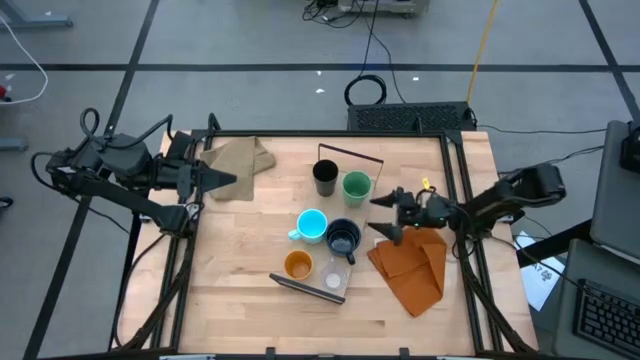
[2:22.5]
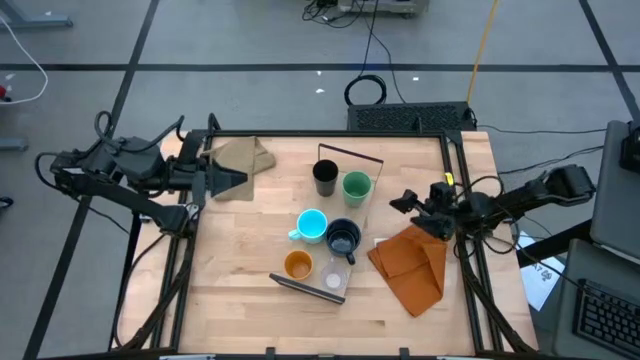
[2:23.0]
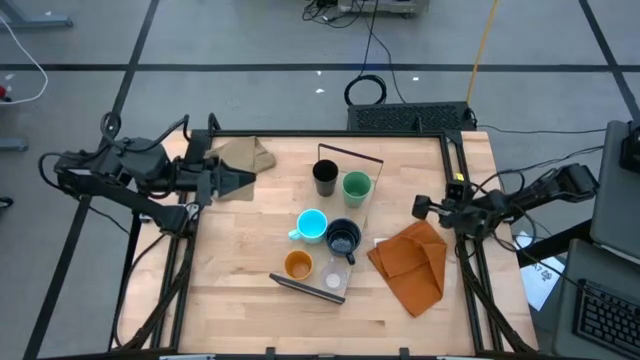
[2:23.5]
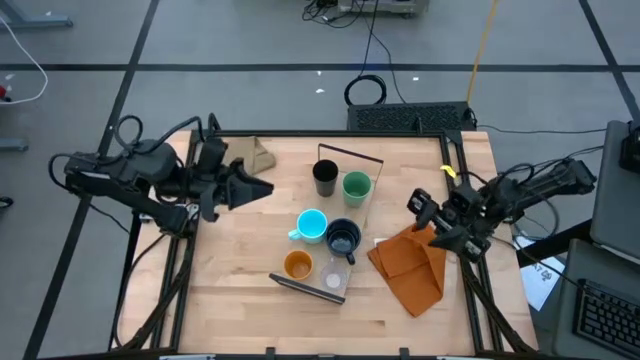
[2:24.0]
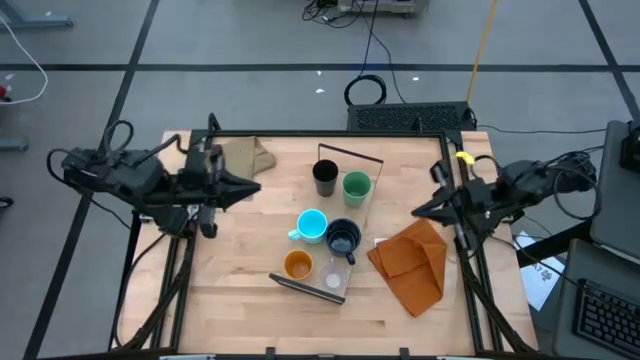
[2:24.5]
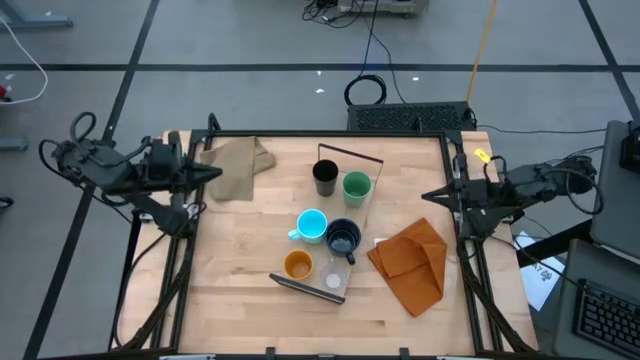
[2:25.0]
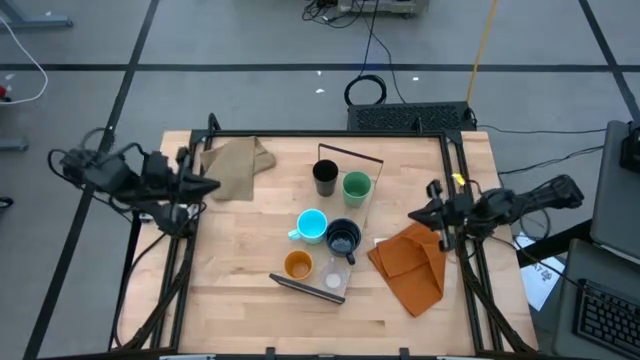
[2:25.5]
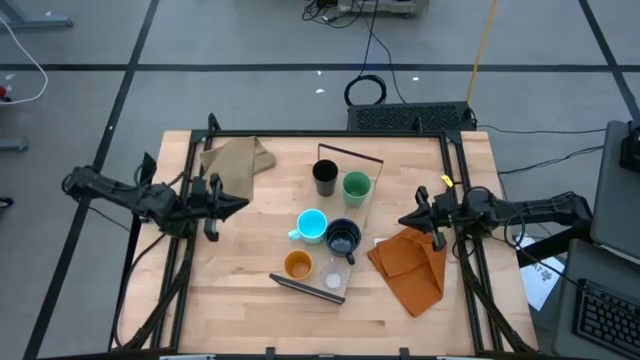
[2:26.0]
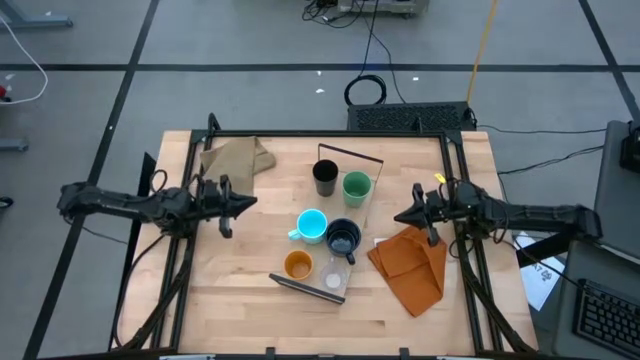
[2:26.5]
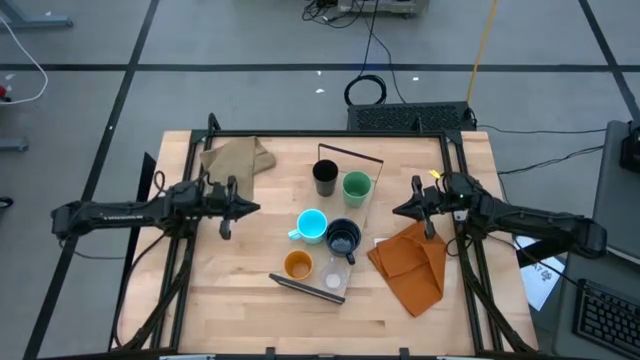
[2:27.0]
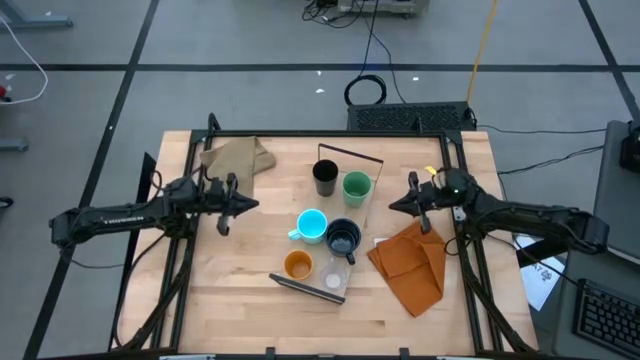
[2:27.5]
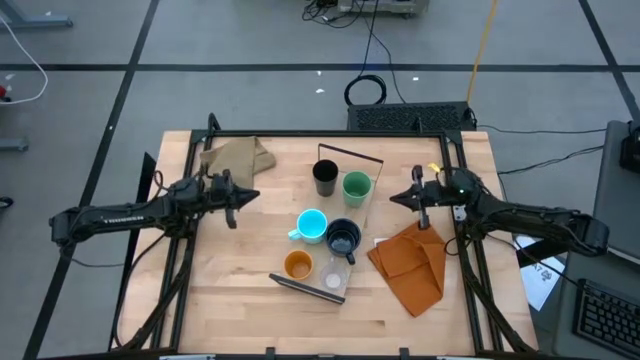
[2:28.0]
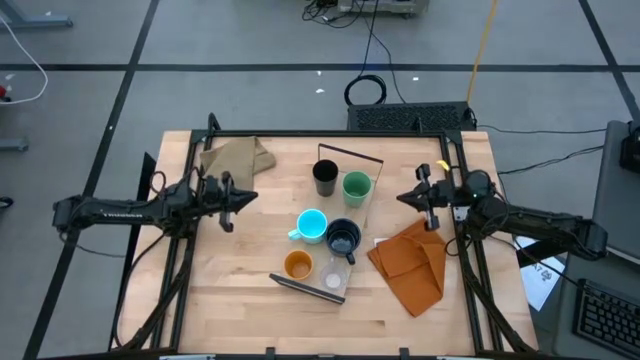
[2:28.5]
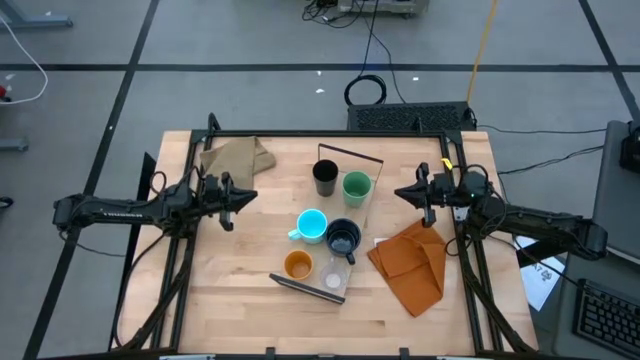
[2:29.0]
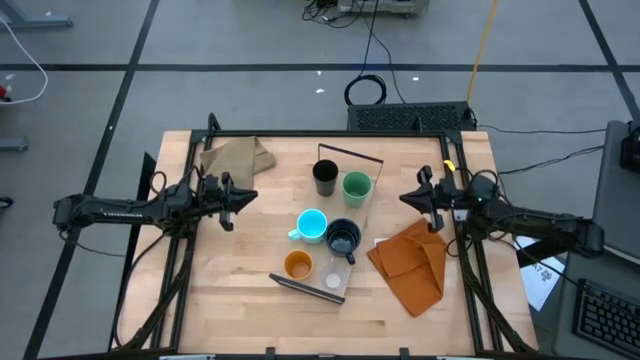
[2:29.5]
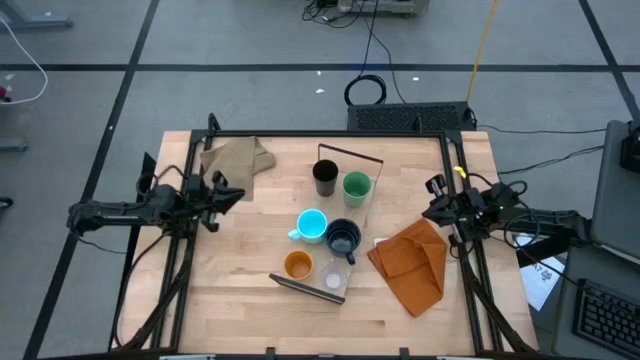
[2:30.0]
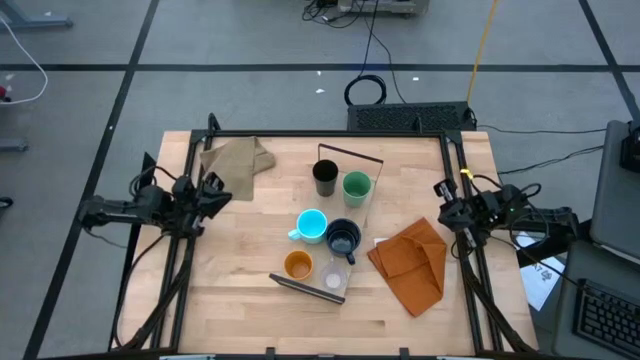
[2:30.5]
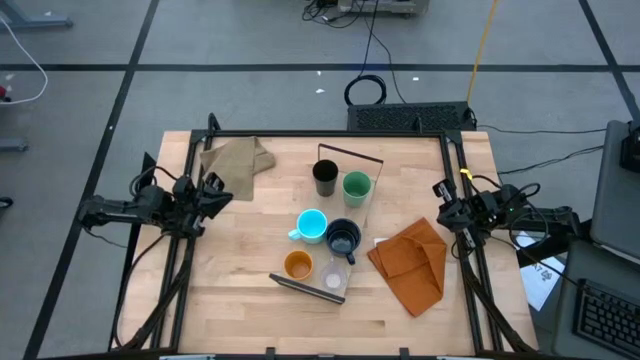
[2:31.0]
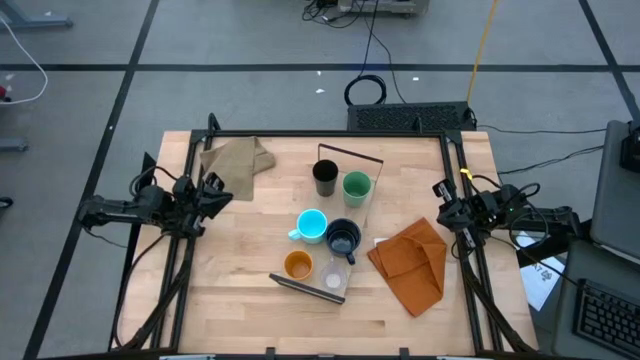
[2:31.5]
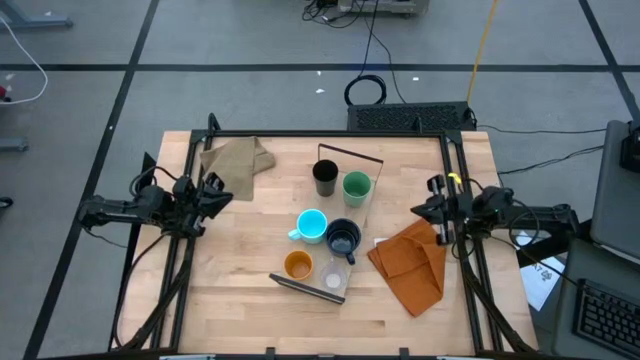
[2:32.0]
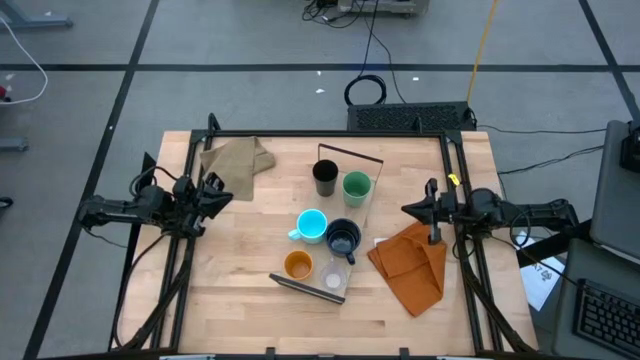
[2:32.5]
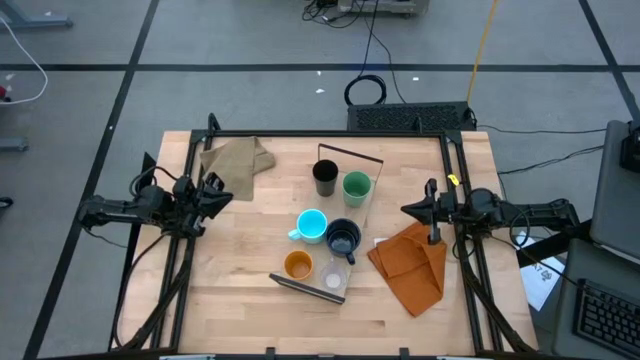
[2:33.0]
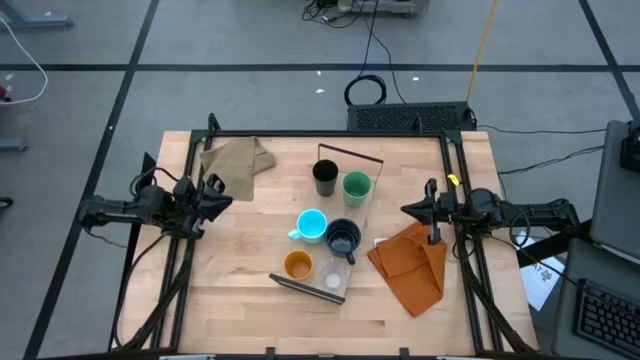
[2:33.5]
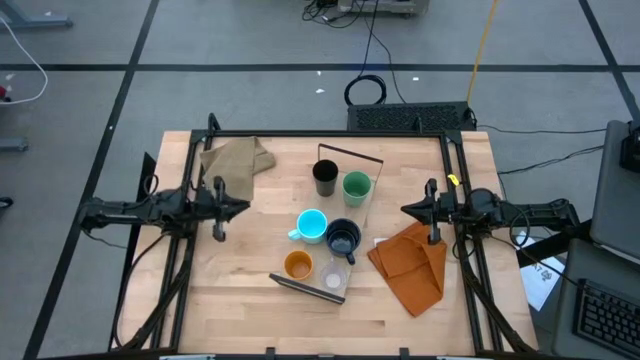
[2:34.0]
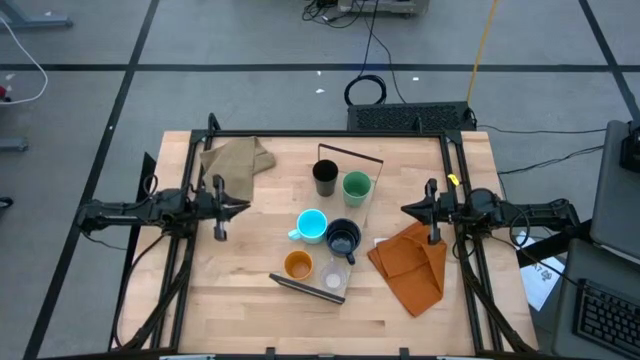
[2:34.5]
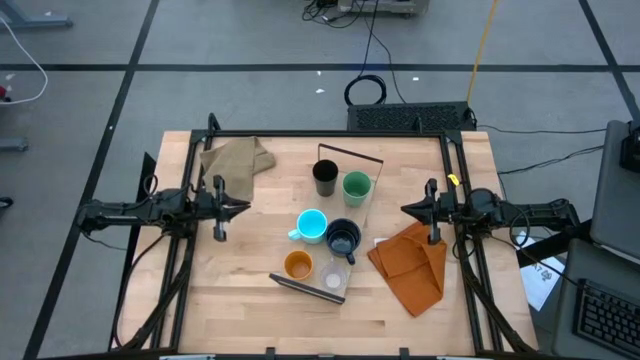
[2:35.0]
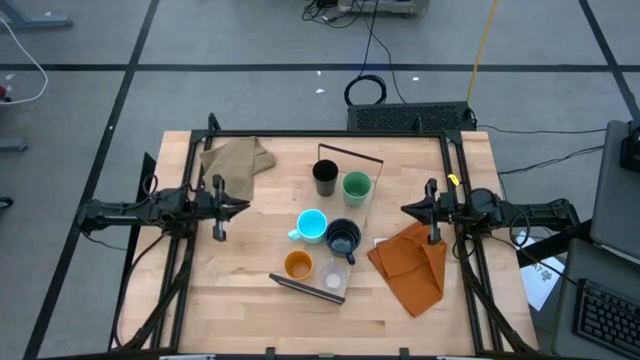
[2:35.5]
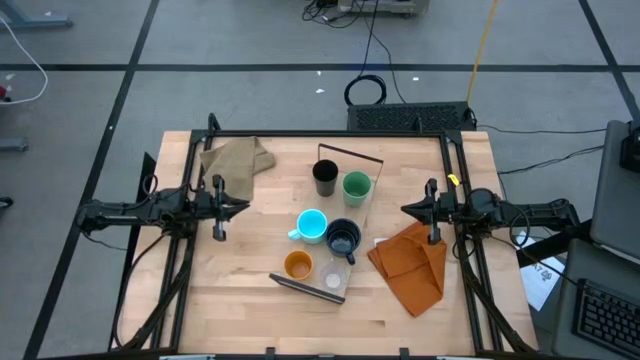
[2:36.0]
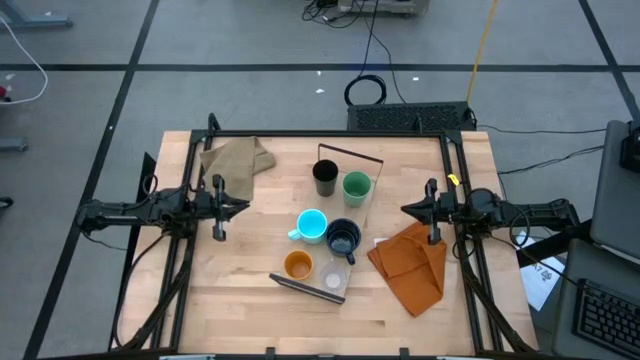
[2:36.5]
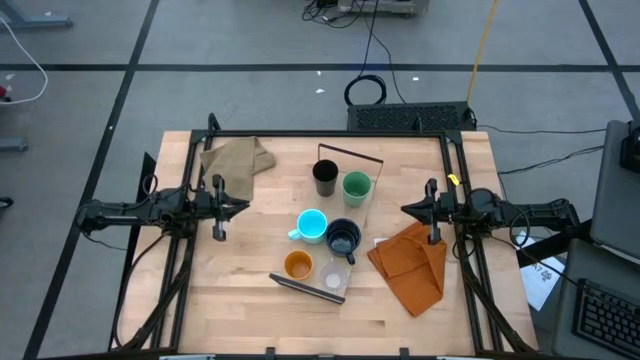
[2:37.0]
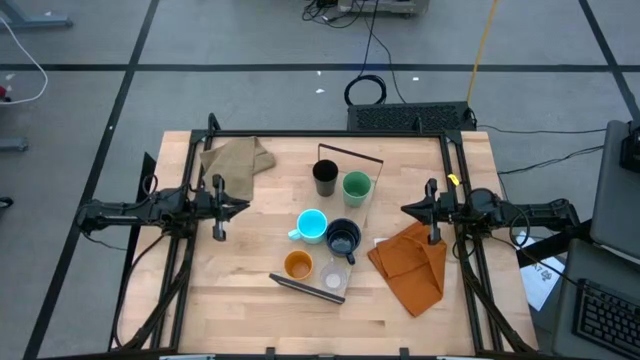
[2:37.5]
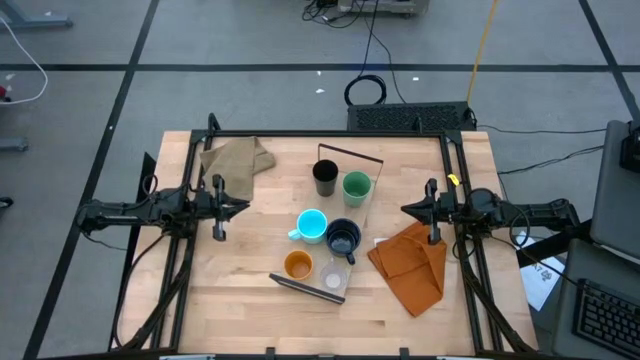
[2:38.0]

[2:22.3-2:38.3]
Task: Stack small to large cups/mugs on shelf
Return to Home Position

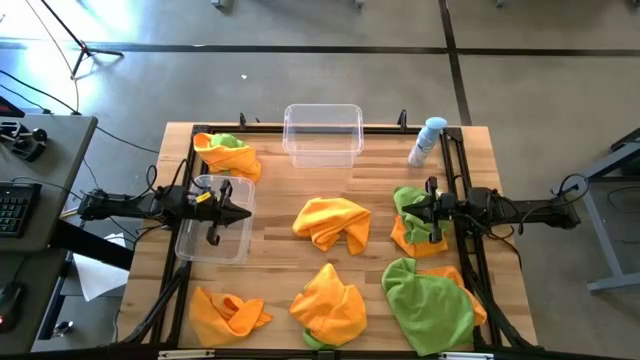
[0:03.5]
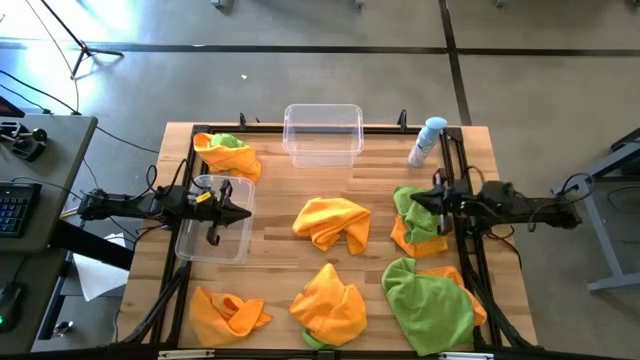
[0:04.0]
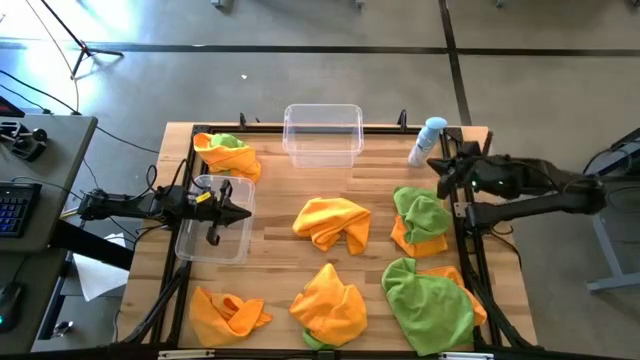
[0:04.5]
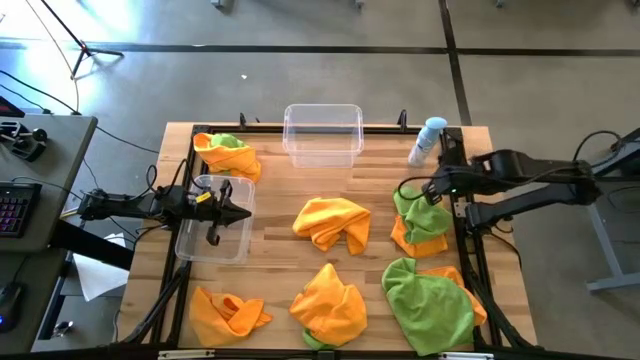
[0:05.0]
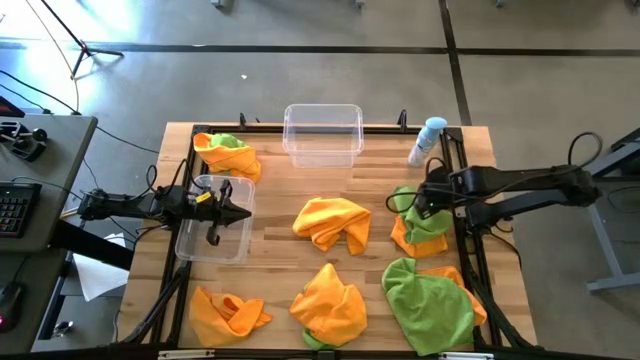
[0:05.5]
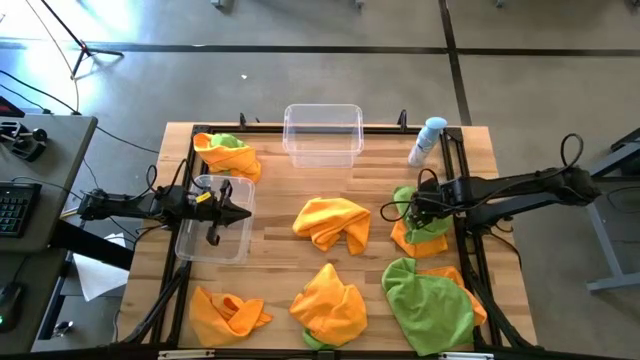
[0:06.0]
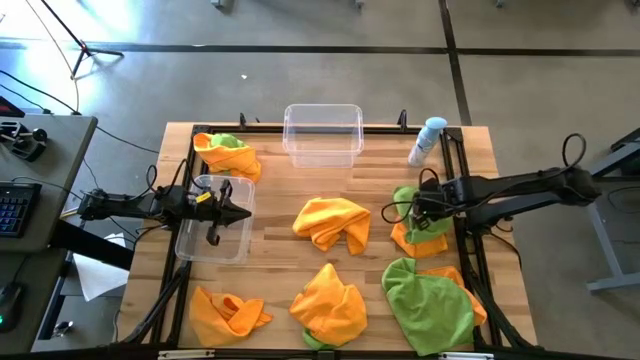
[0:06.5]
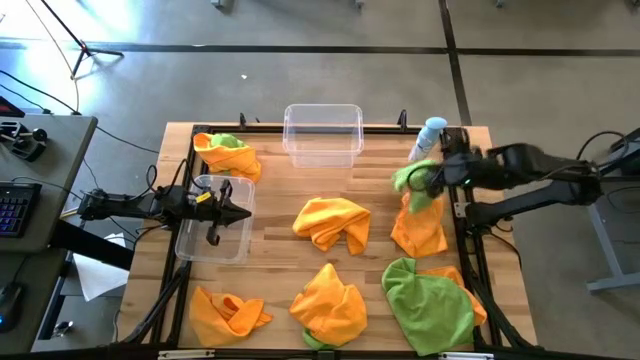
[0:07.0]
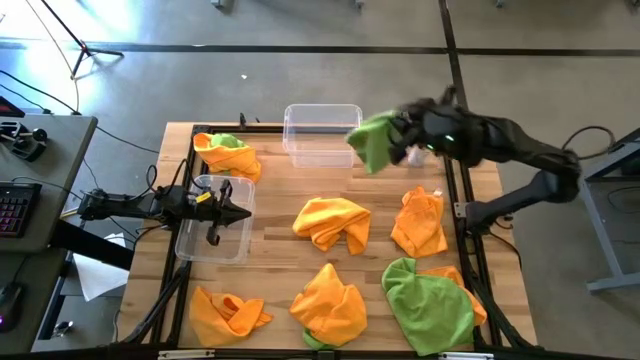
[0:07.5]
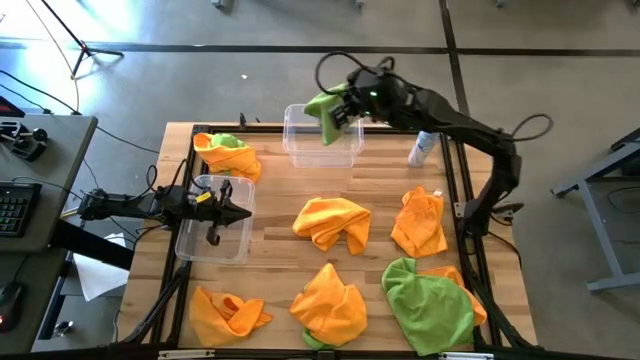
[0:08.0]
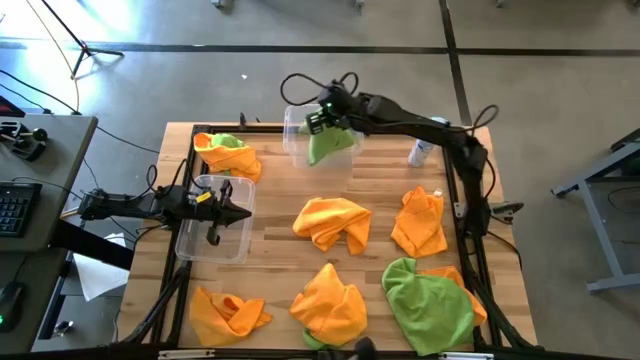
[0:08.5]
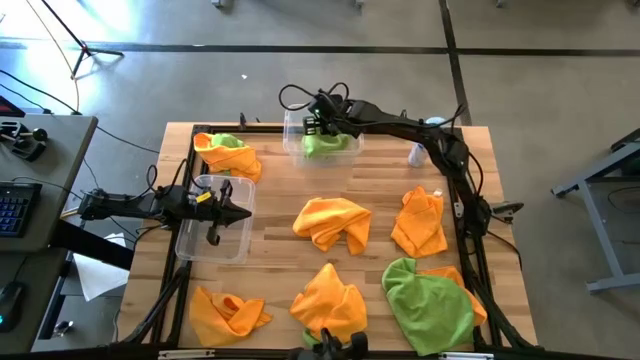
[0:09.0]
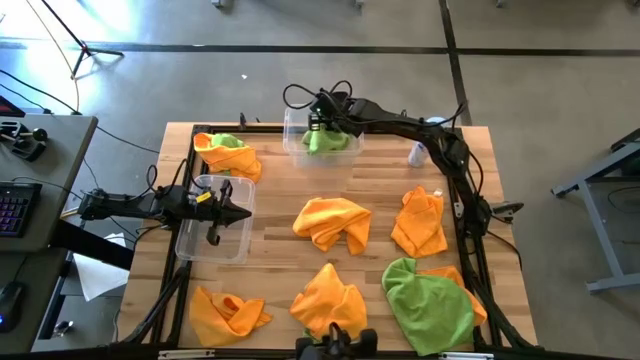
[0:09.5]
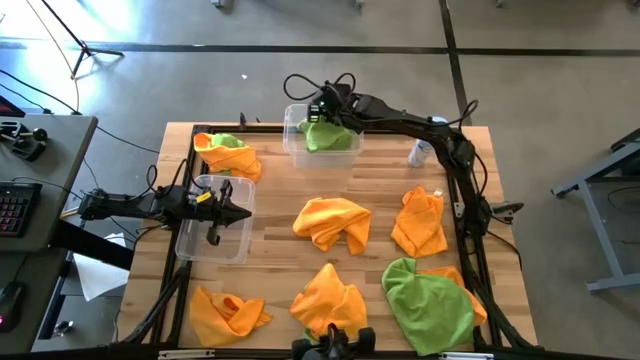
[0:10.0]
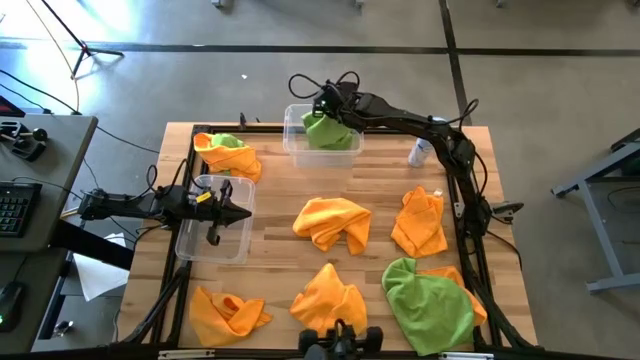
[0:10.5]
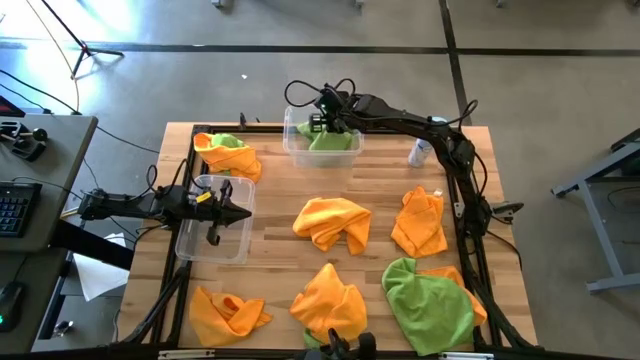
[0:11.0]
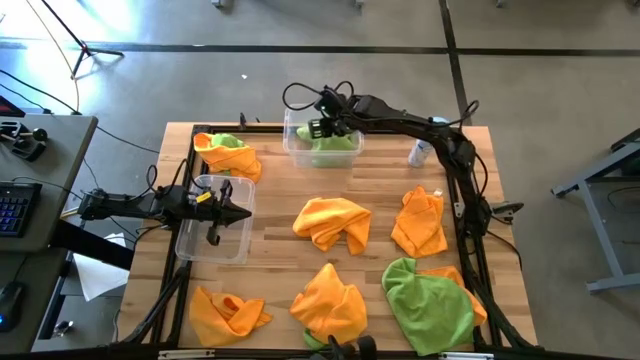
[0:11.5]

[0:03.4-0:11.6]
Task: Sort microfiber towel by color & place in baskets
Put the green microfiber towel into the top transparent bin
